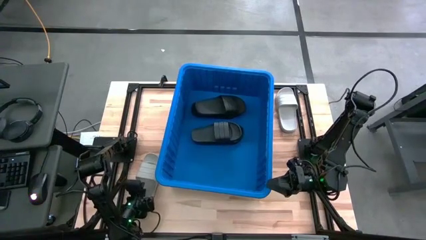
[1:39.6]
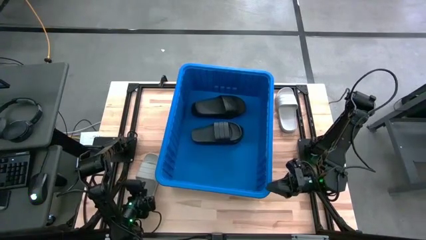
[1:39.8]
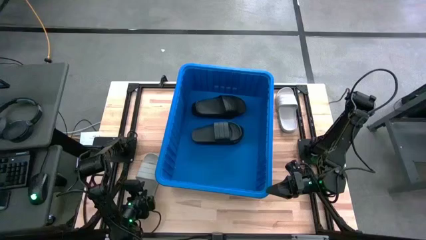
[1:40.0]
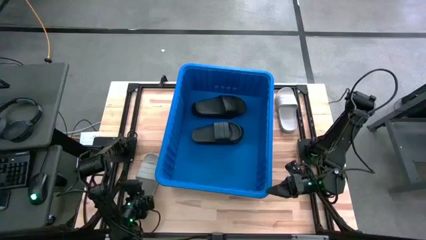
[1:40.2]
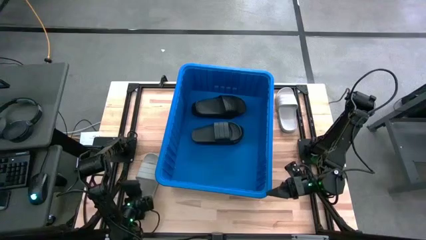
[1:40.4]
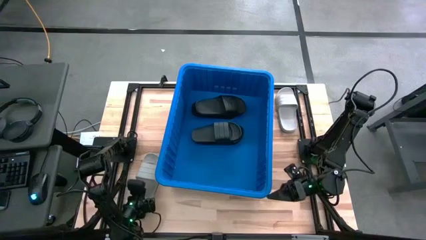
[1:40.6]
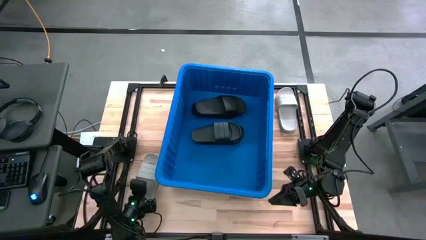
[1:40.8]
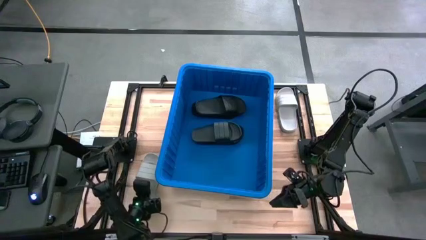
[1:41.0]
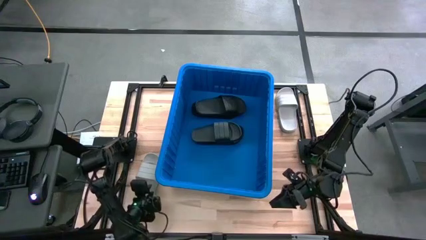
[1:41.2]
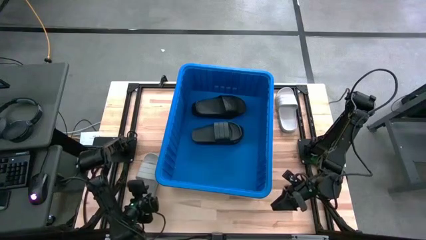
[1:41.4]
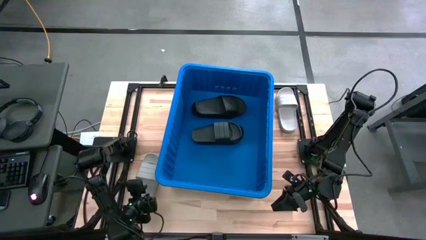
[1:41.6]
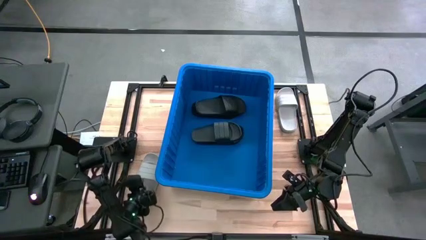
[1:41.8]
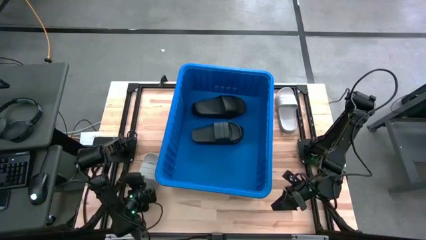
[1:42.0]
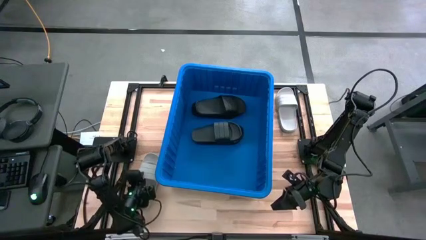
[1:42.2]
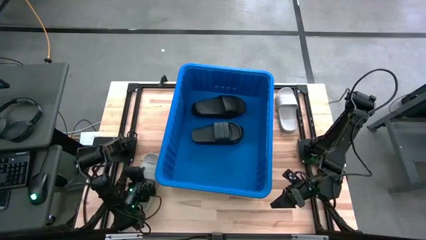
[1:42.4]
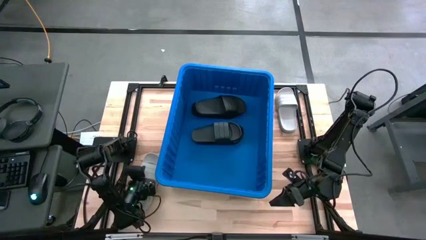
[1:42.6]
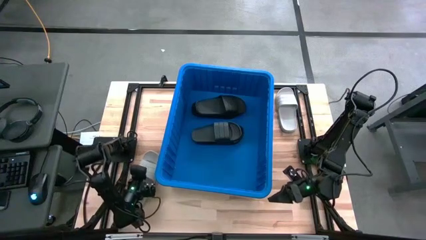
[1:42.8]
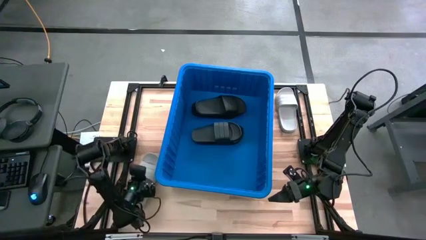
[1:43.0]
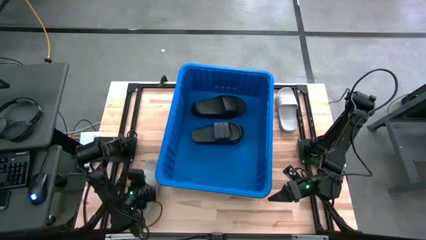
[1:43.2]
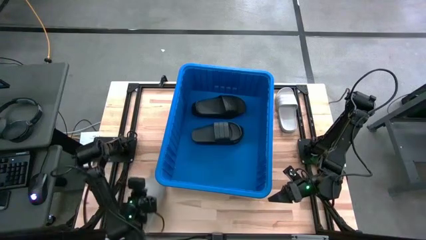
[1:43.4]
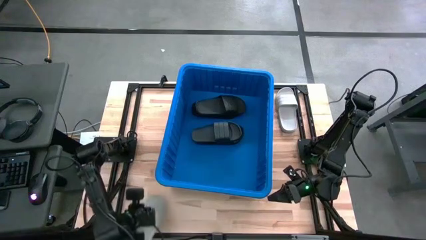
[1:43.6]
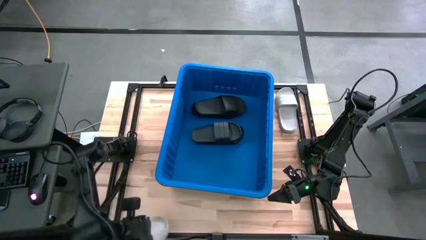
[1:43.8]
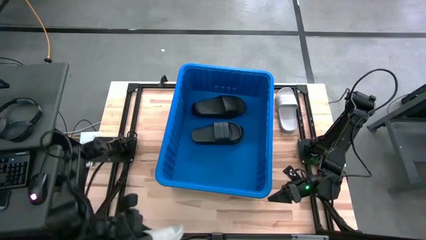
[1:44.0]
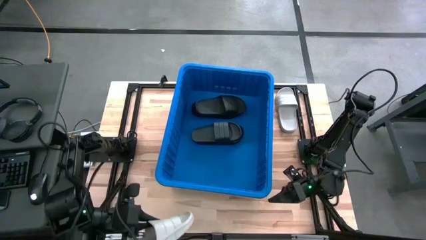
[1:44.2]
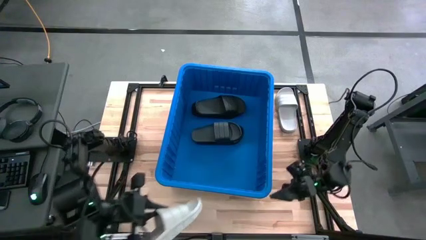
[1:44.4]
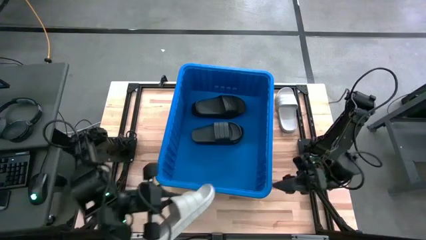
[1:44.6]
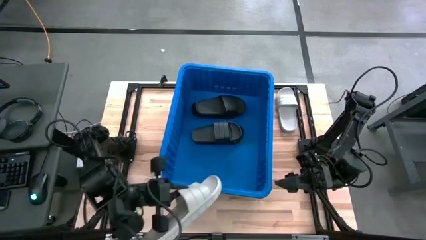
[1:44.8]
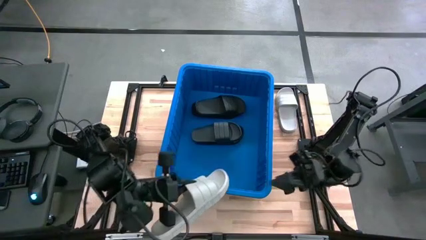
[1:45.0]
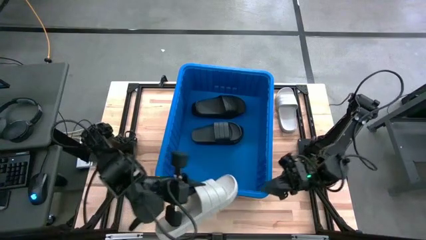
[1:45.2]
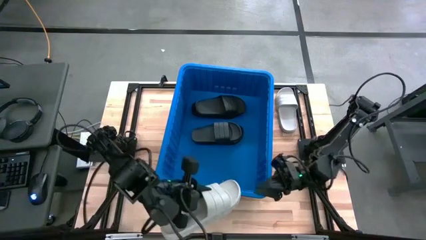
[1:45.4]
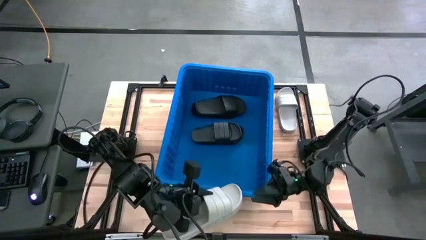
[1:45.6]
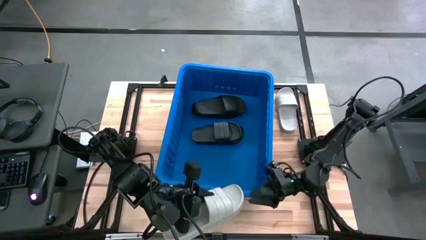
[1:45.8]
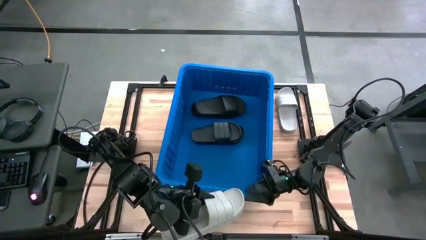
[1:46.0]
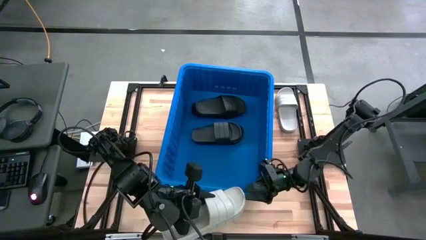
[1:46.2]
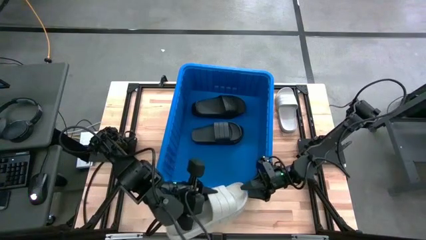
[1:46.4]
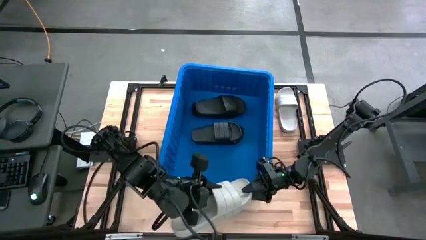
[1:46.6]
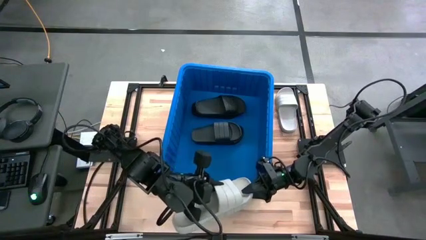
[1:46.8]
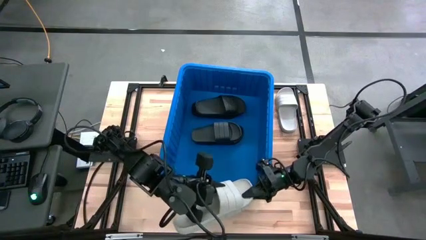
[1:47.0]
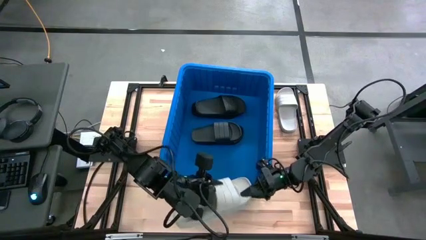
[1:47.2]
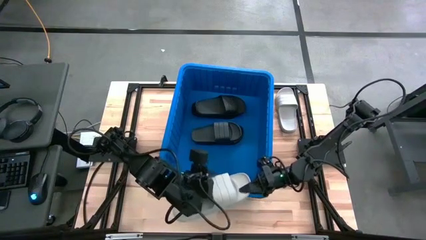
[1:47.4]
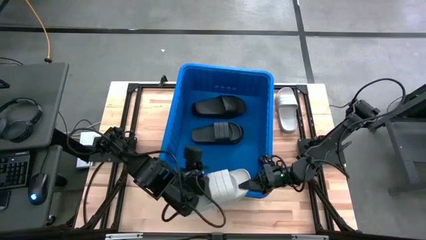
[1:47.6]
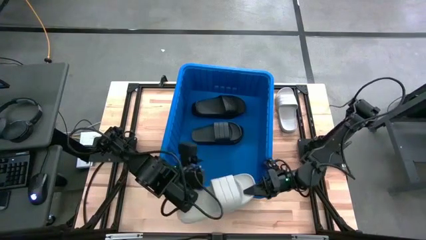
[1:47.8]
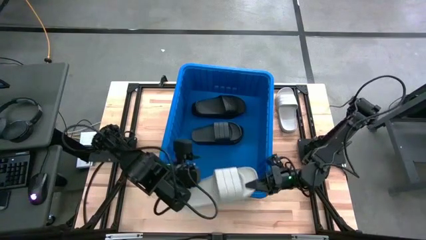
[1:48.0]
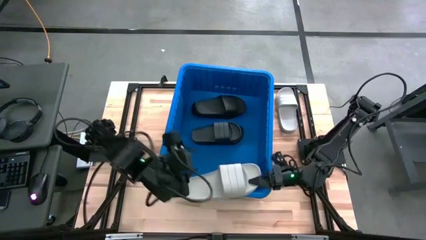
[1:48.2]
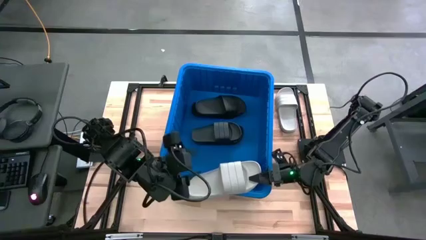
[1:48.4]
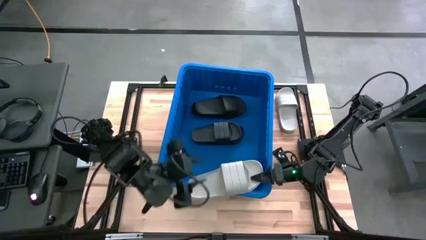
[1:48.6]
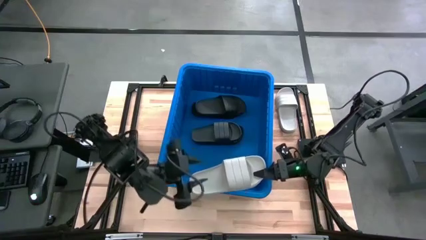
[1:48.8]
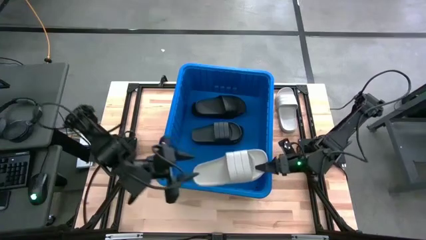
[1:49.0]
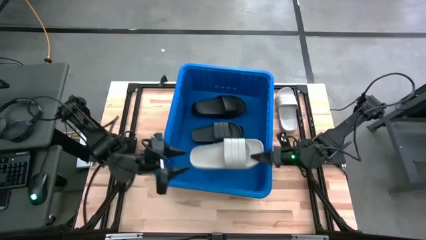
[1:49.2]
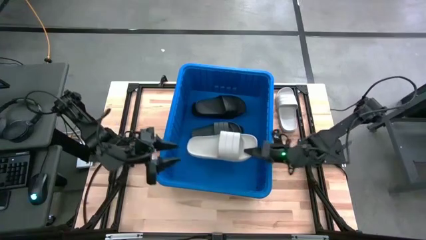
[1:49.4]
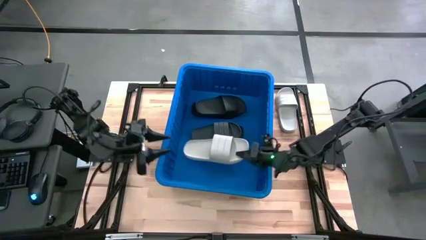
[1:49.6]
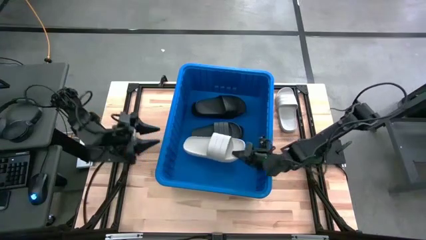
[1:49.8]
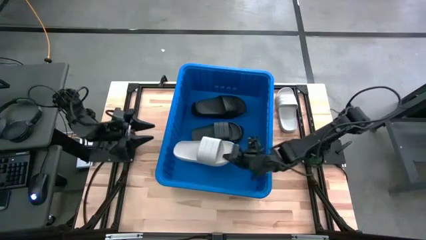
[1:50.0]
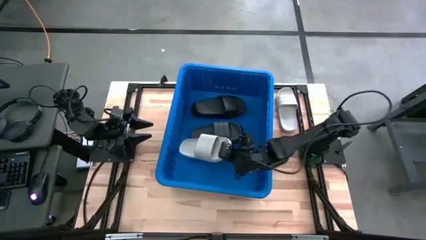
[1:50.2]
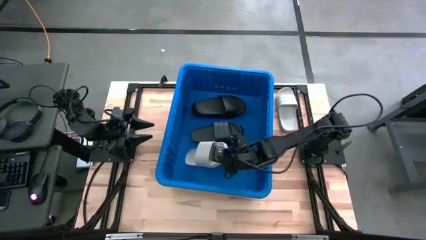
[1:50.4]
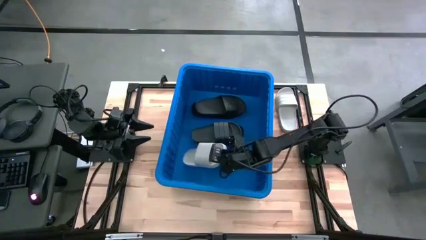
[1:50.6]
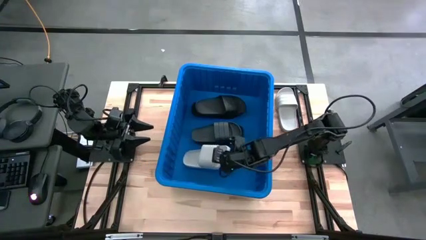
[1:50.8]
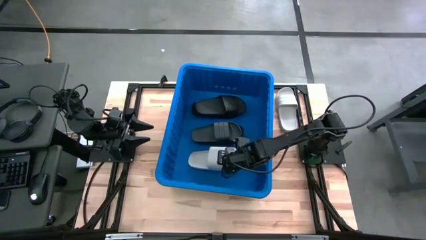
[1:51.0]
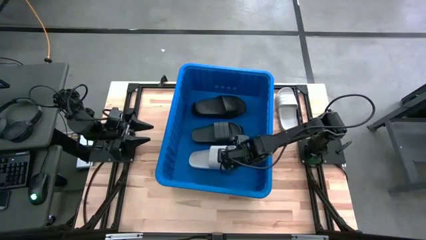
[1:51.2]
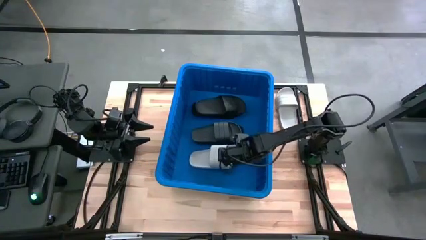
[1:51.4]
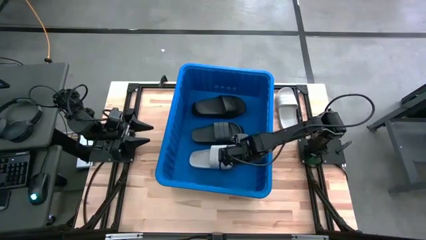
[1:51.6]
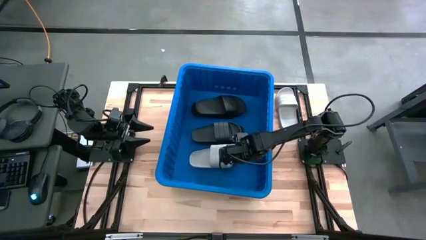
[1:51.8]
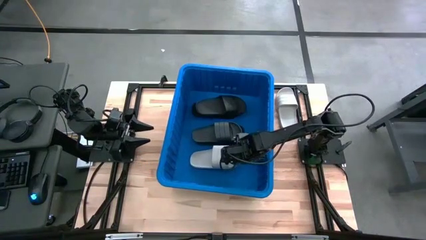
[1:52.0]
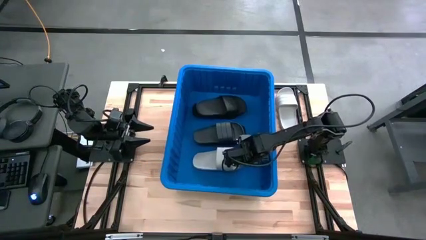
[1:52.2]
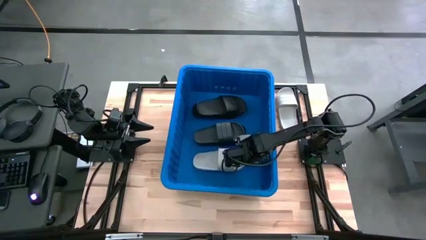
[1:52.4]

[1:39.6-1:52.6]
Task: Pick and place slides into bin
Put the gray slide into the blue container

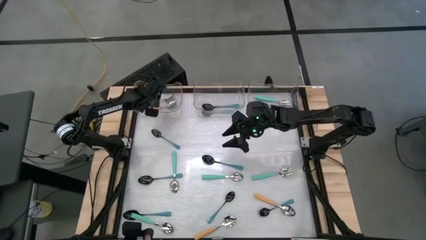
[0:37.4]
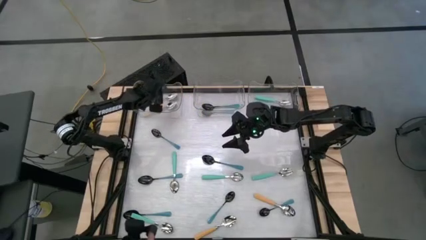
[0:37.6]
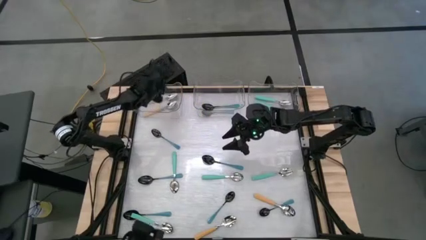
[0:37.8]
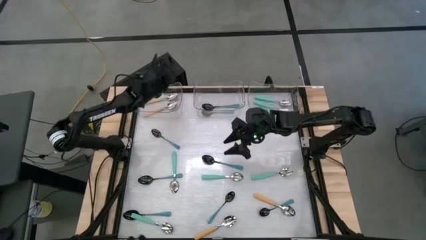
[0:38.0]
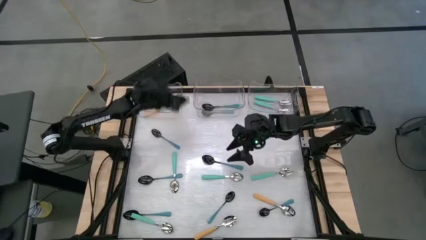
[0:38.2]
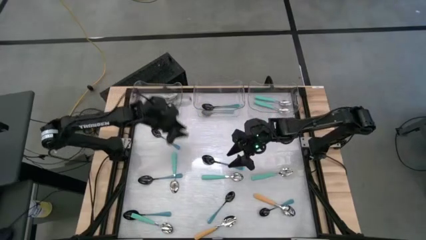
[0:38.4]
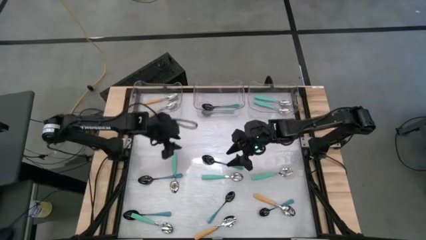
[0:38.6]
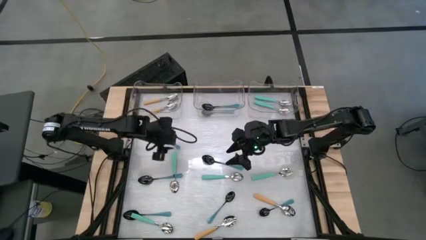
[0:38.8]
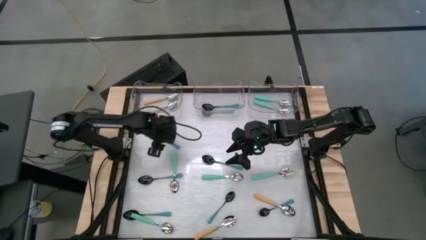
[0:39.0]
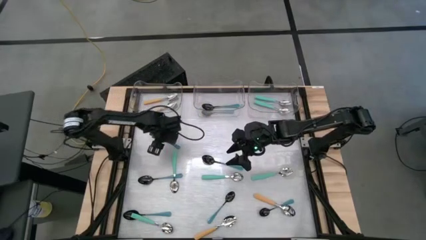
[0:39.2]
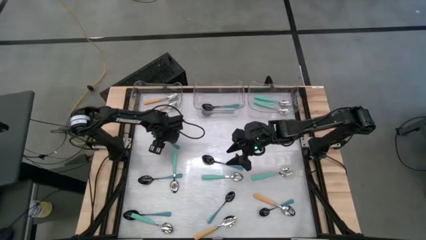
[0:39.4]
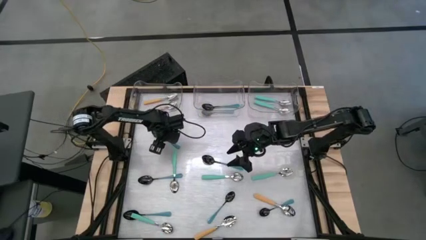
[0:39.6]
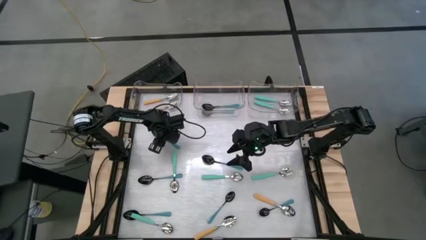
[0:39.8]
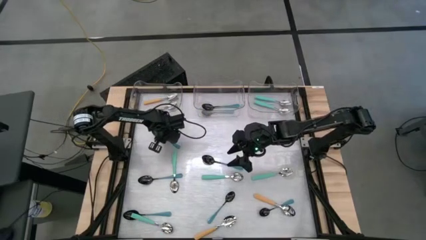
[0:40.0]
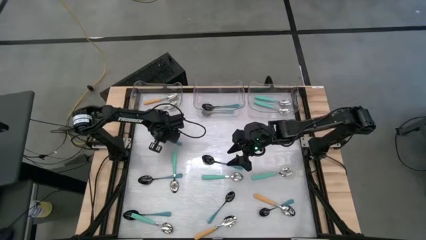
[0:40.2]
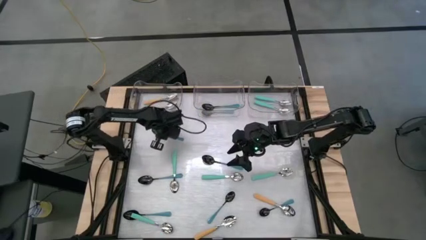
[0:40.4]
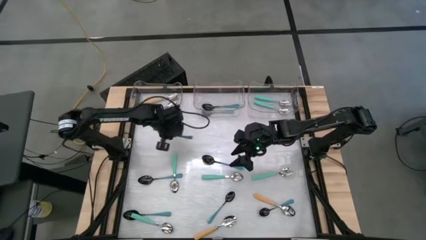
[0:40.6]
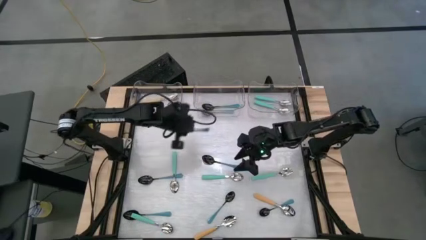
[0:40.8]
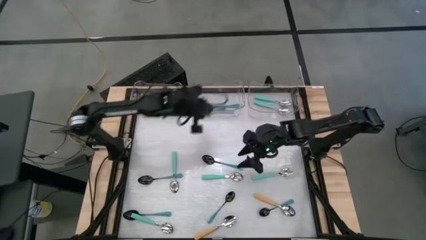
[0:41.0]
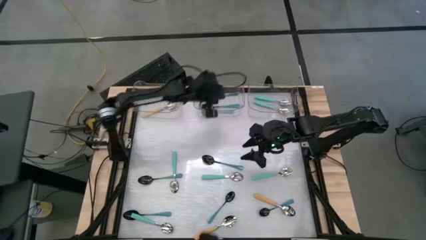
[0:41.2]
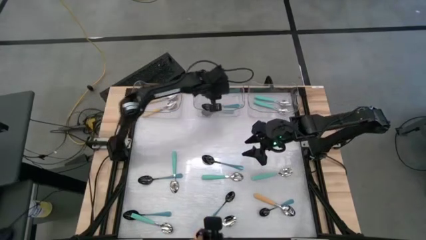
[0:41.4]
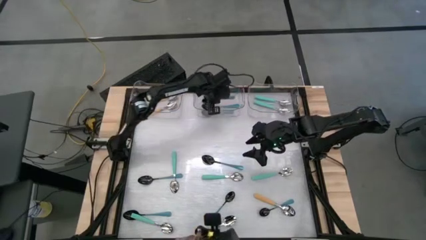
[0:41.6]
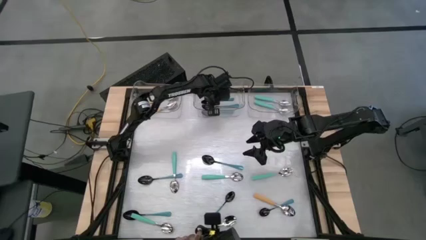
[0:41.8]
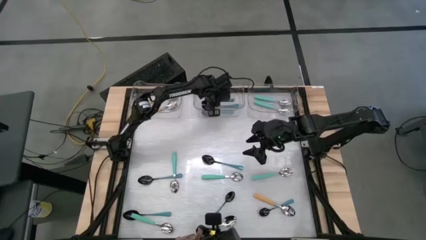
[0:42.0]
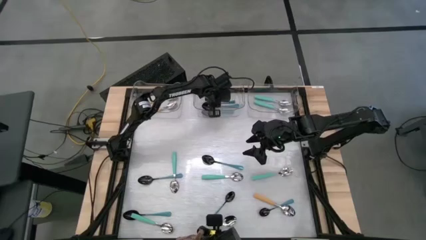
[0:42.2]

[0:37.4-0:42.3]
Task: Sort silverware by color (type)
Put the blue spoon into the middle transparent bin
